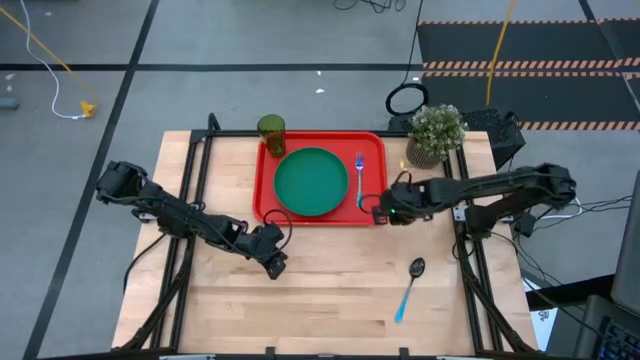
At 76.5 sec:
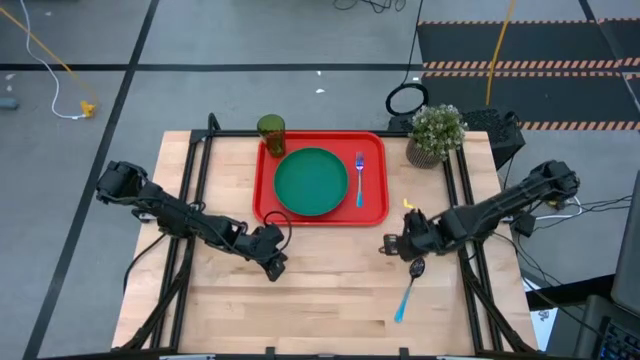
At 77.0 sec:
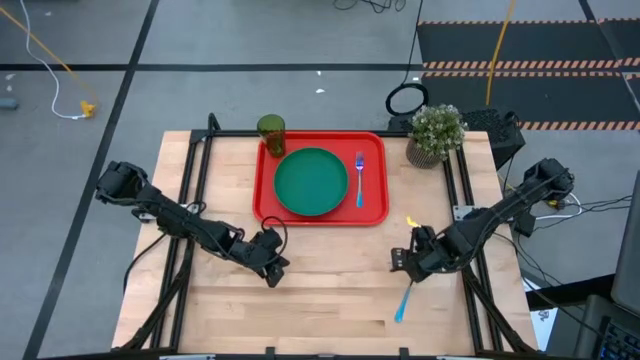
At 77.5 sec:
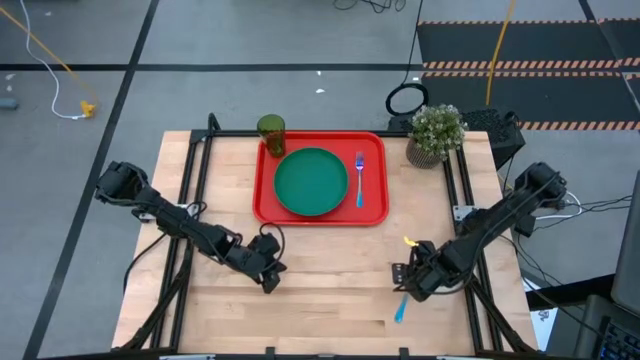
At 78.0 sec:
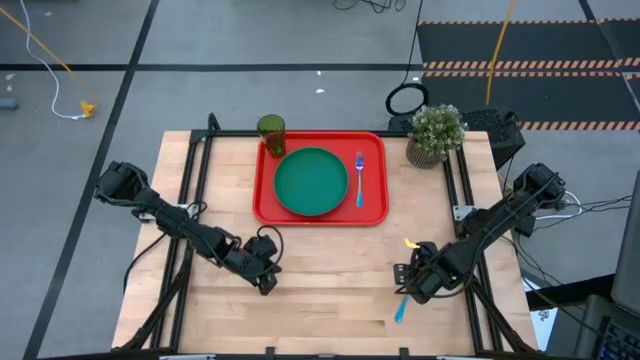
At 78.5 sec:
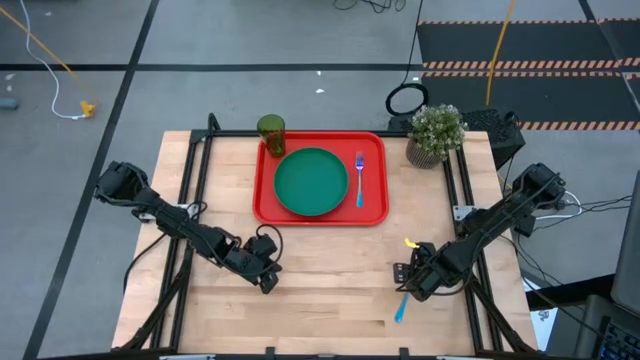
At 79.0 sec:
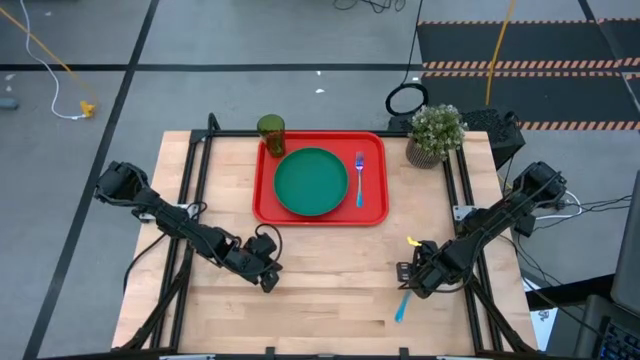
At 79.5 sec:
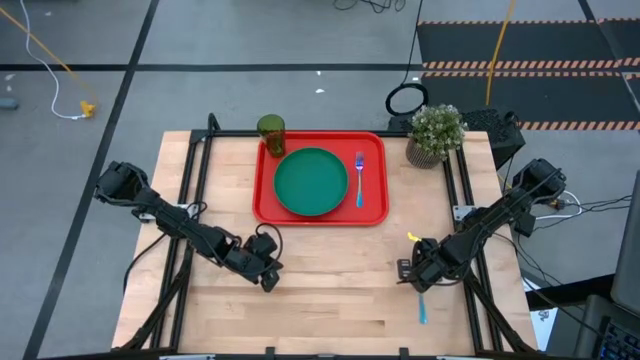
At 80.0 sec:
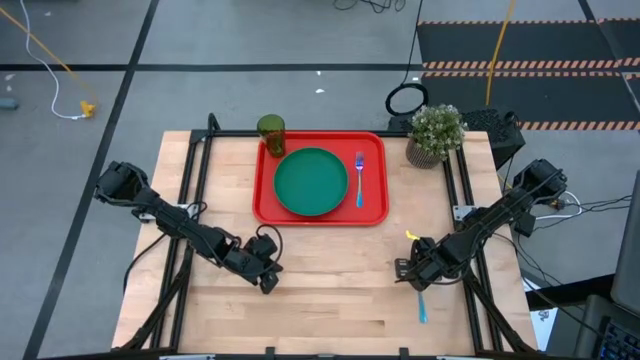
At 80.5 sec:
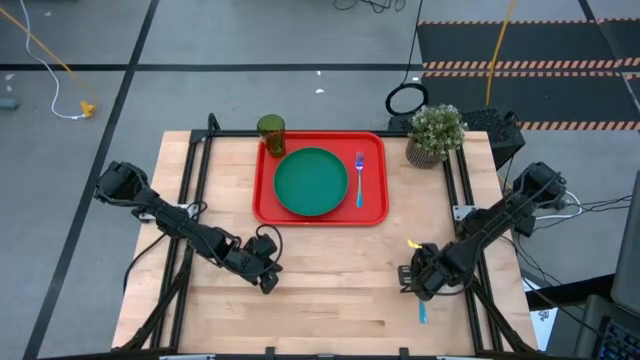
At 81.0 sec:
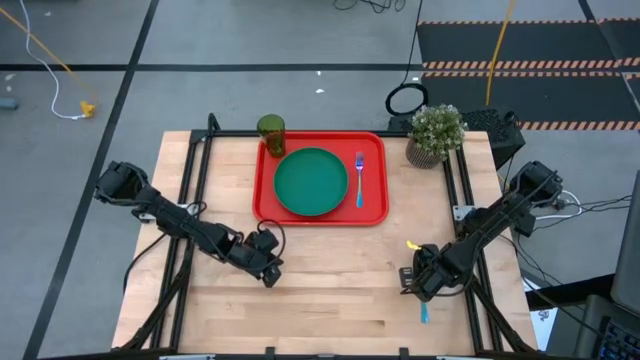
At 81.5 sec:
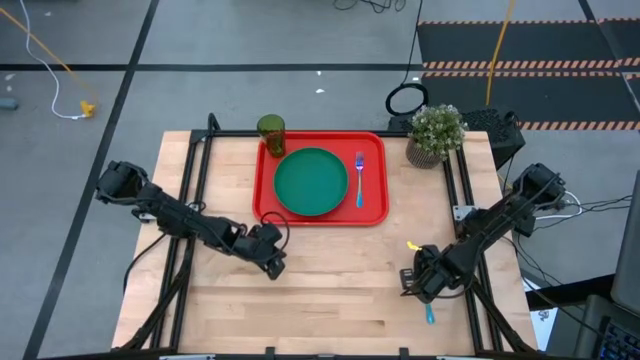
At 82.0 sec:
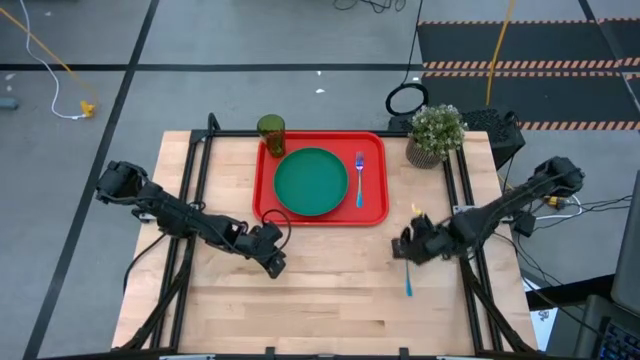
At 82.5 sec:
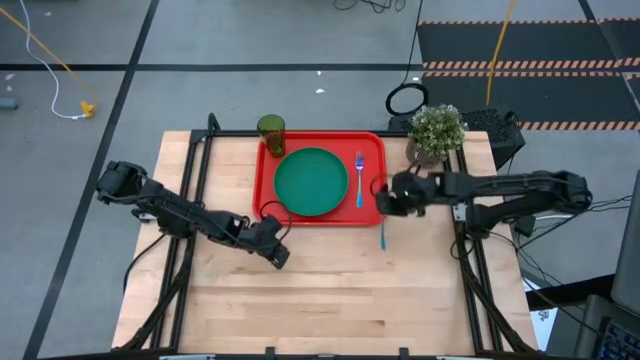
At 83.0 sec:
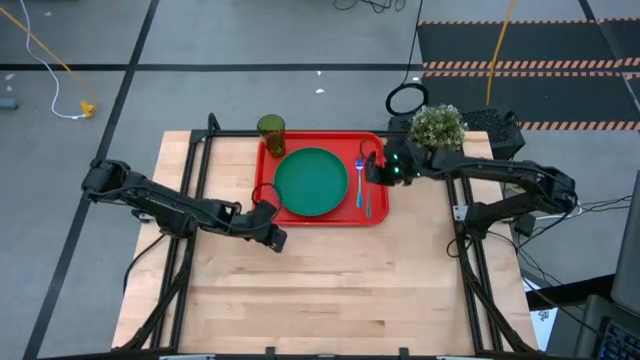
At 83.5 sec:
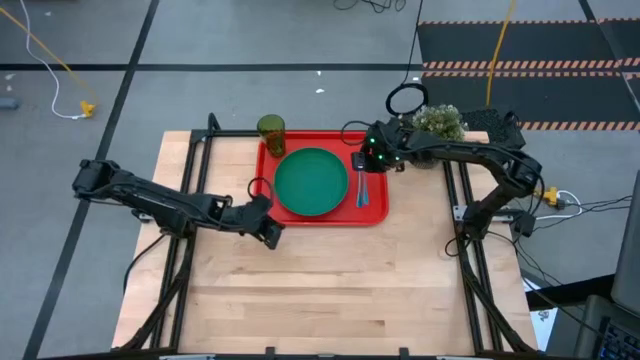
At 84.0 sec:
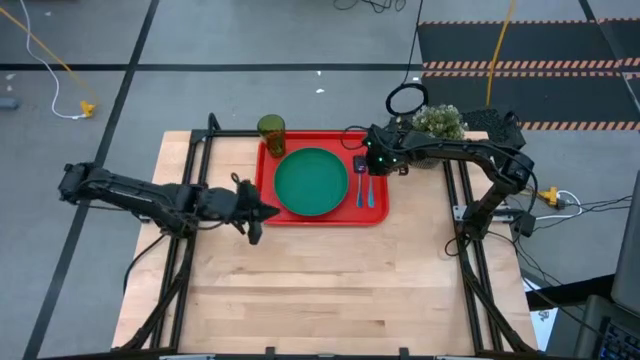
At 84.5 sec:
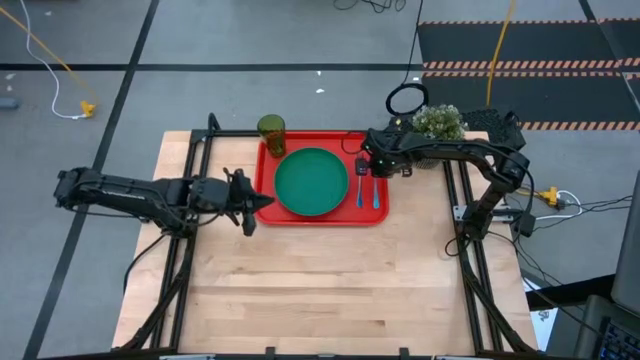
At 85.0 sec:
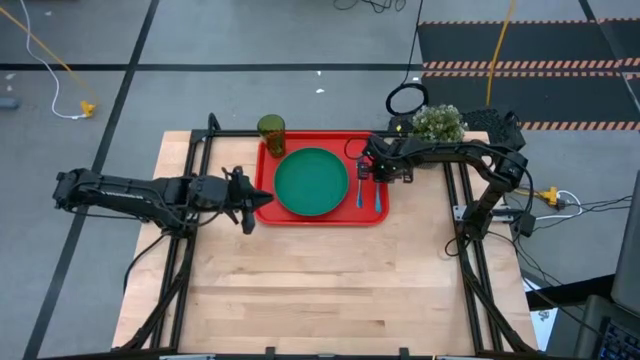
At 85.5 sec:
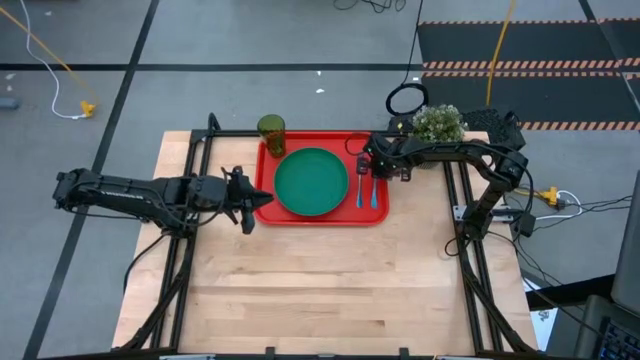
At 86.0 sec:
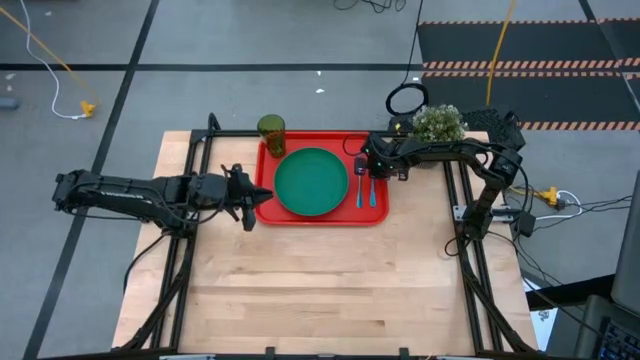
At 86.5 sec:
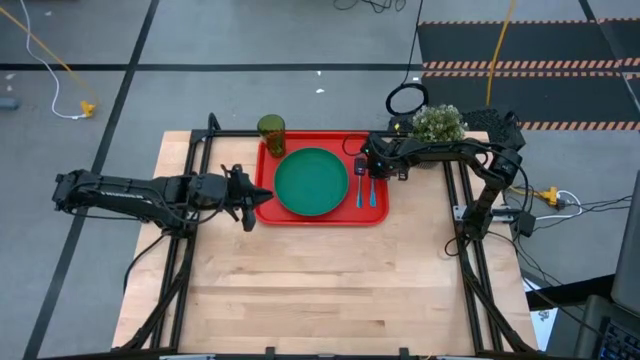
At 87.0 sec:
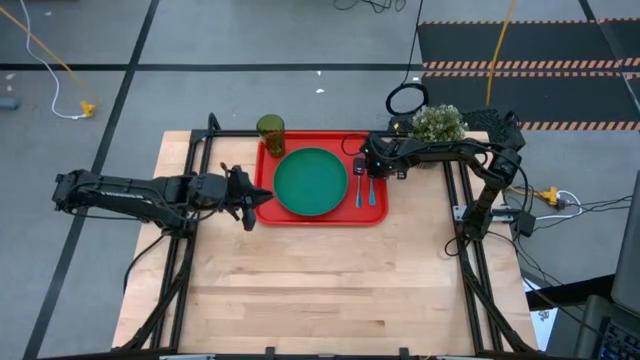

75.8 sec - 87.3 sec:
Task: Pick and place plate/cup/fork/spoon on tray
Put the blue spoon on the orange serving tray to the right of the blue fork

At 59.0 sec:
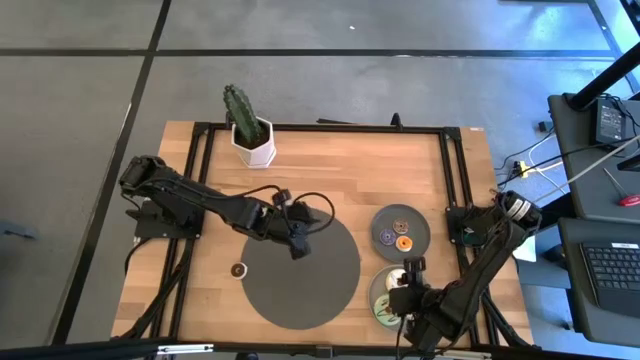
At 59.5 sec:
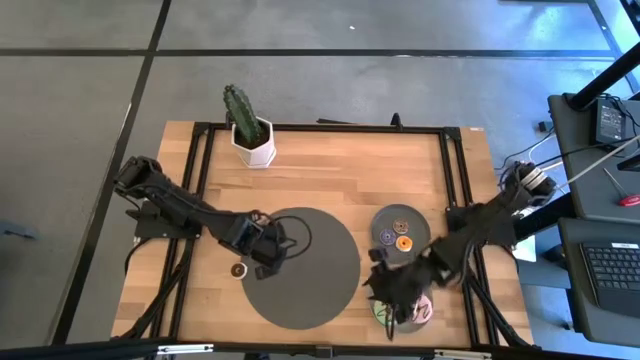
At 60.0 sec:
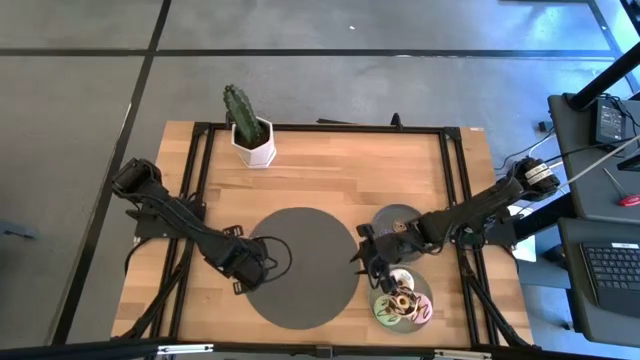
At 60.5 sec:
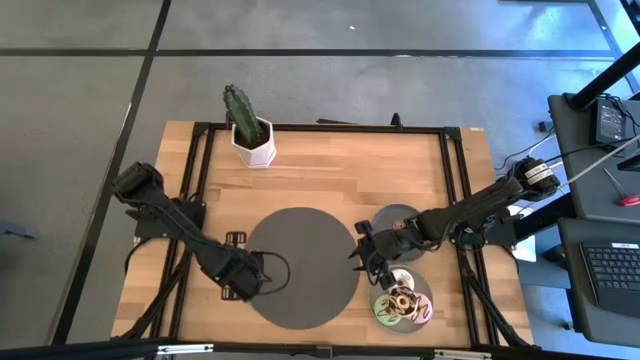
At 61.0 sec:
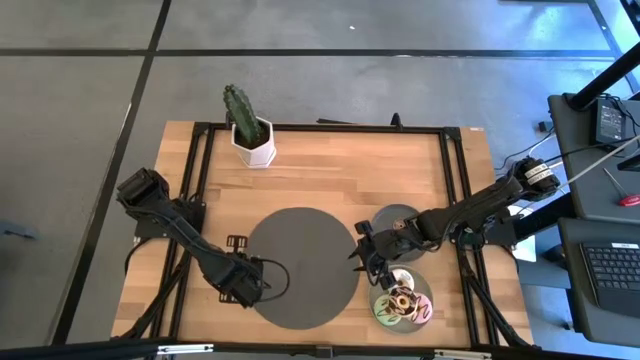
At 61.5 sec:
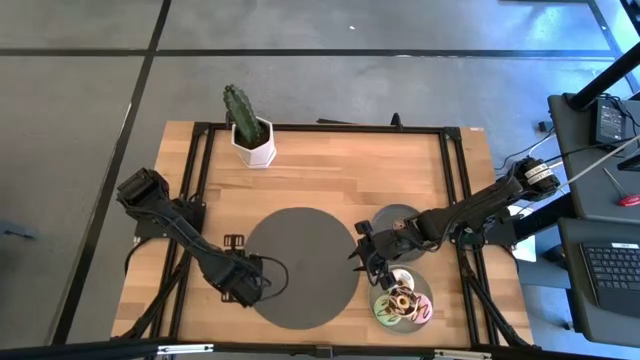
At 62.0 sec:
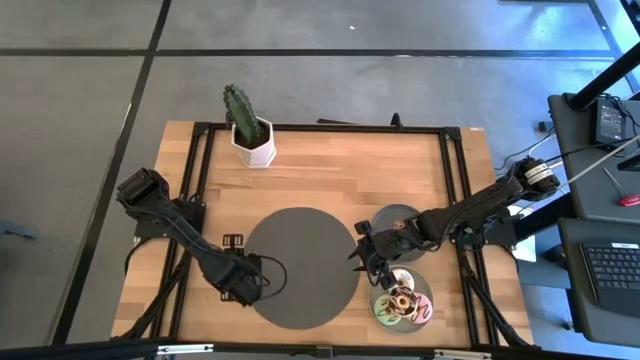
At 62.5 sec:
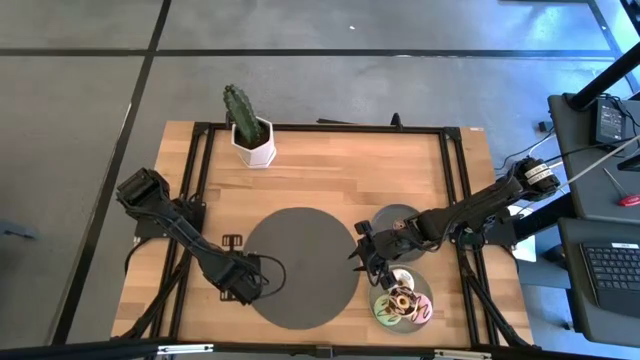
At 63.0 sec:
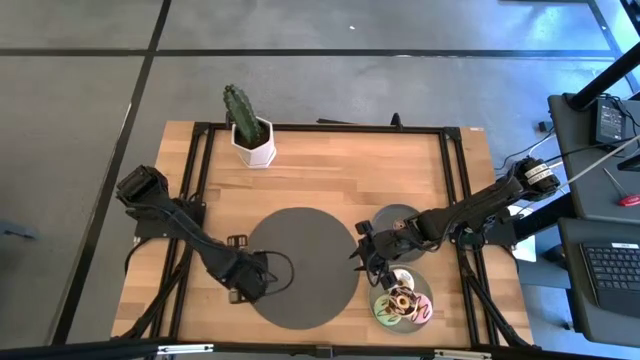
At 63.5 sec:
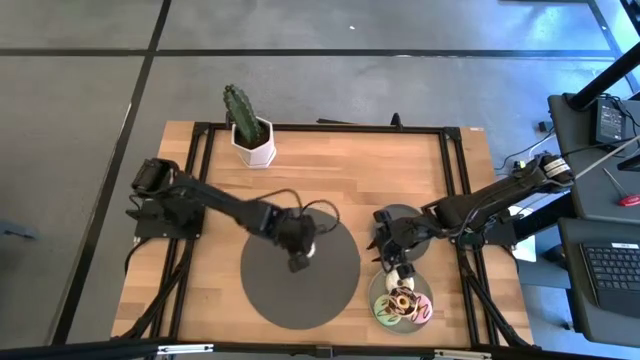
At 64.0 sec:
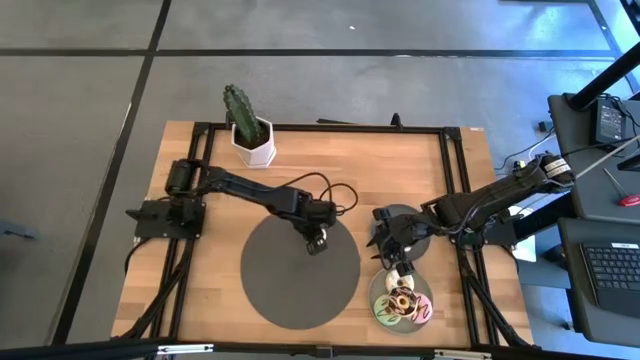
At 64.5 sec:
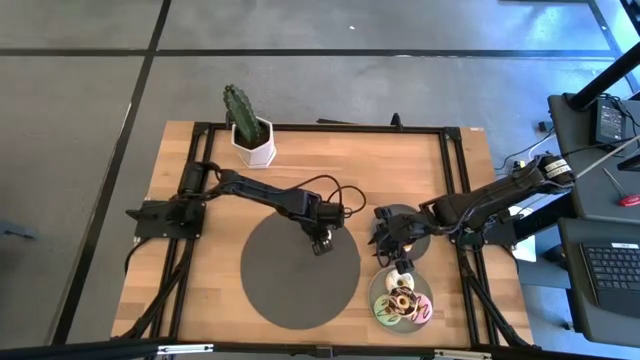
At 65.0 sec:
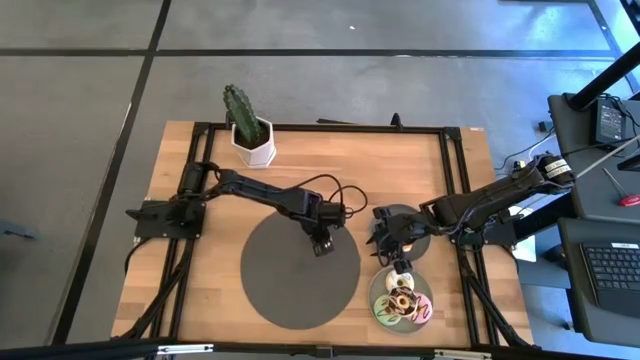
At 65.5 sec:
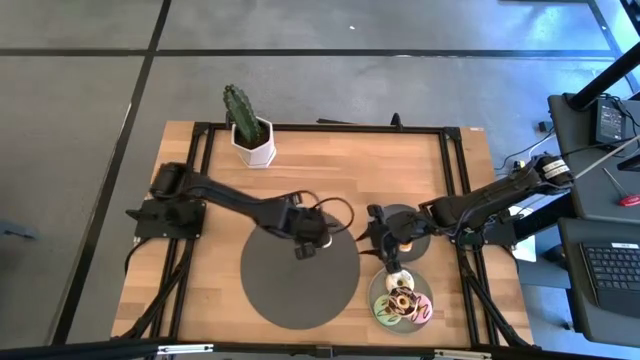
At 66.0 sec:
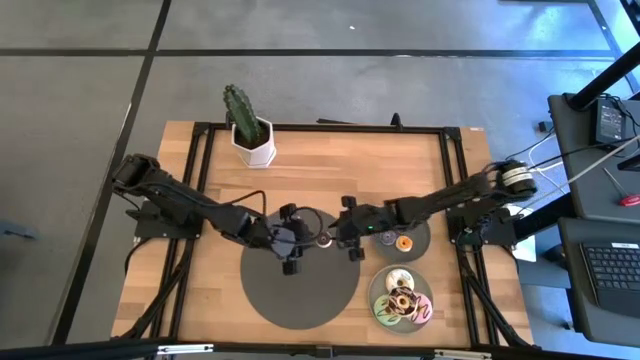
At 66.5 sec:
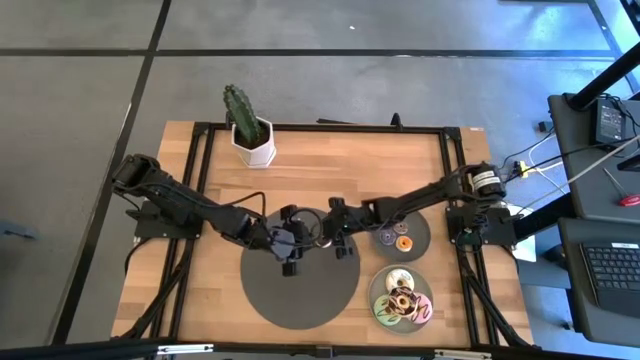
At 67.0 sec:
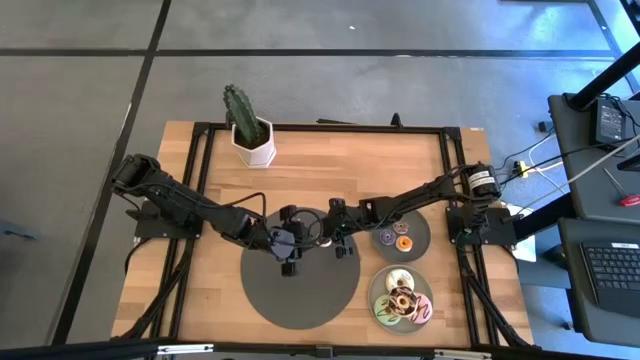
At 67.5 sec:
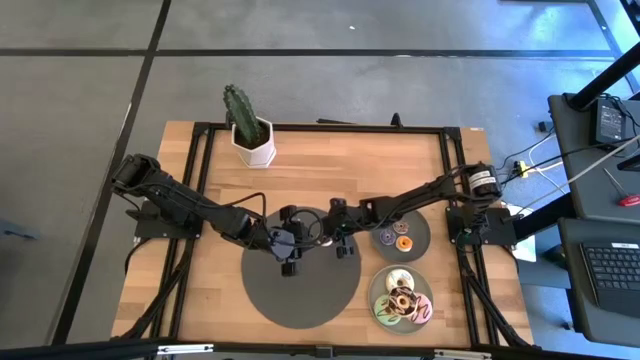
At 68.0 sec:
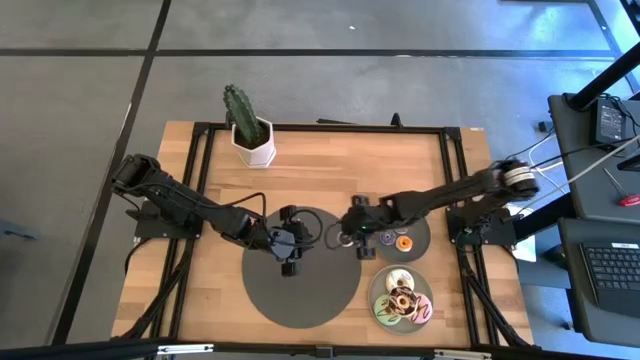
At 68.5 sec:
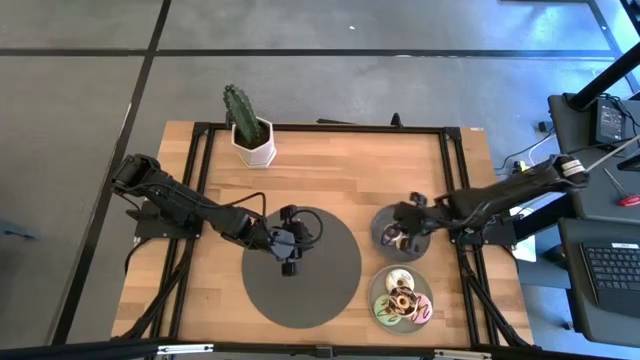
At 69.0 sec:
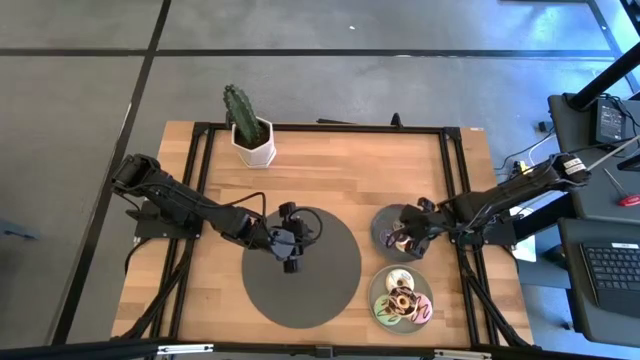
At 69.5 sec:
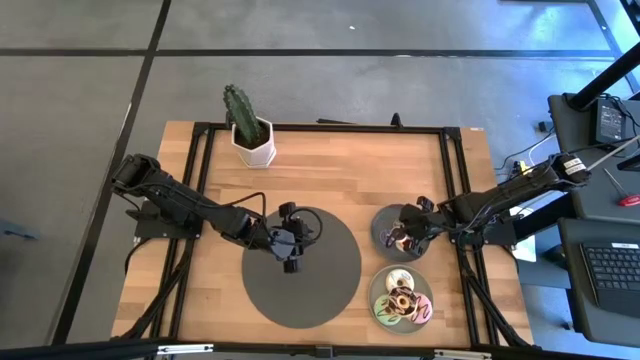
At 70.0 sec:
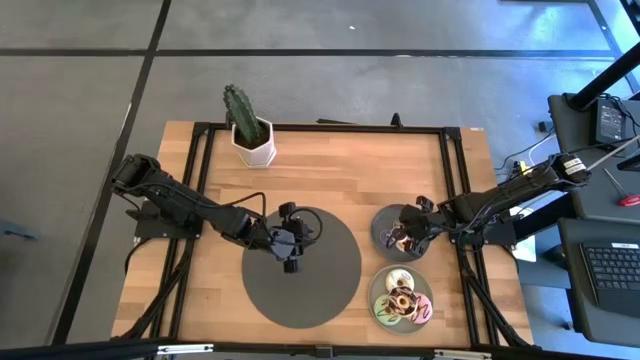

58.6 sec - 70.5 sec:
Task: Pick & Place donuts
Put the small black donut on the dark gray plate
